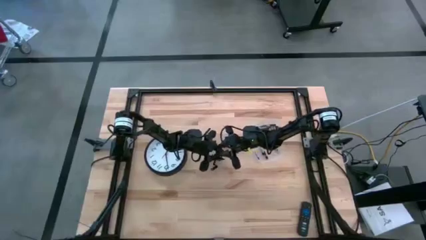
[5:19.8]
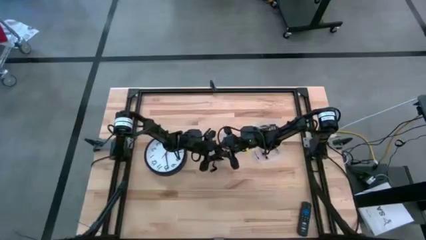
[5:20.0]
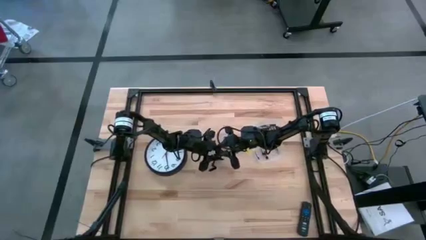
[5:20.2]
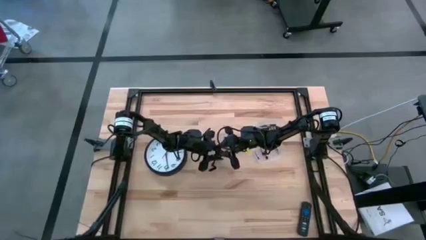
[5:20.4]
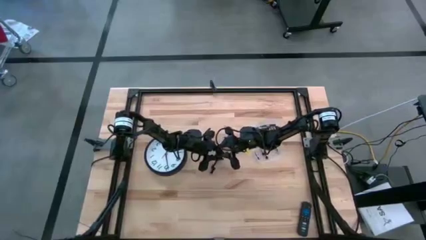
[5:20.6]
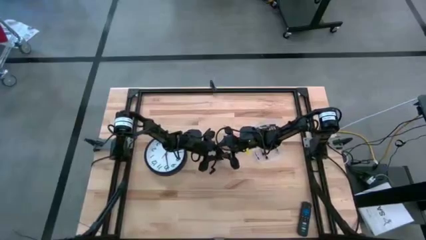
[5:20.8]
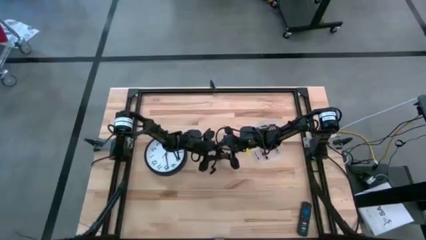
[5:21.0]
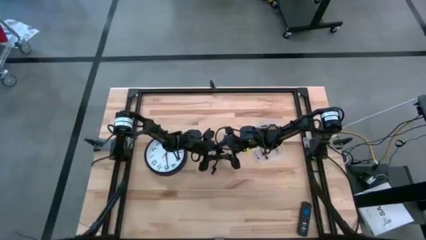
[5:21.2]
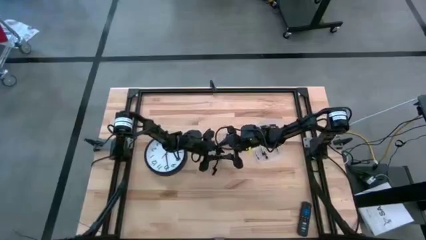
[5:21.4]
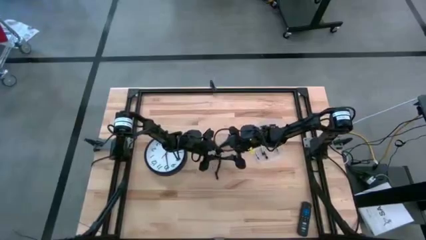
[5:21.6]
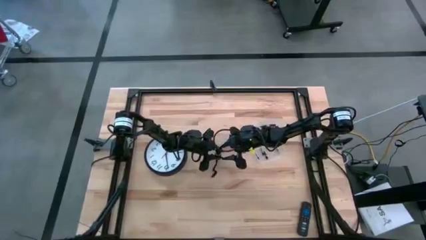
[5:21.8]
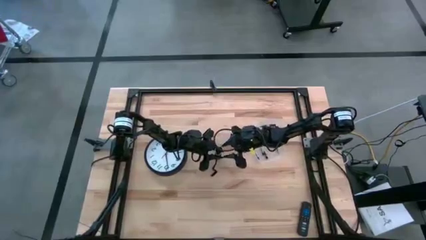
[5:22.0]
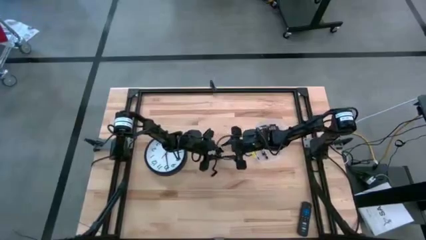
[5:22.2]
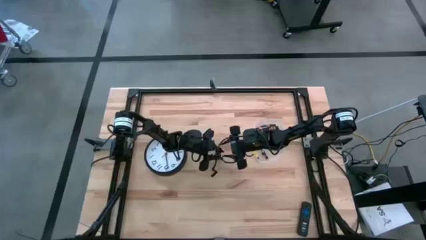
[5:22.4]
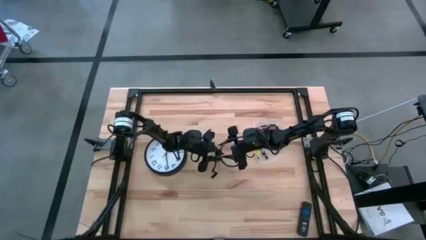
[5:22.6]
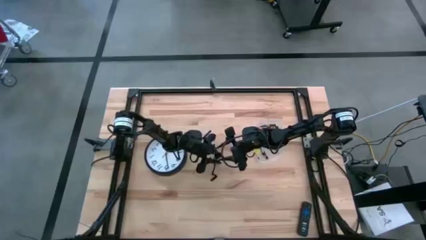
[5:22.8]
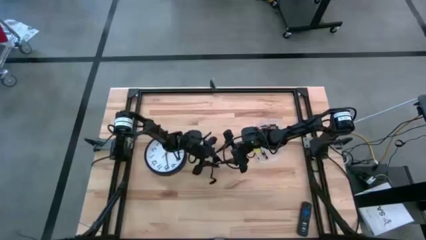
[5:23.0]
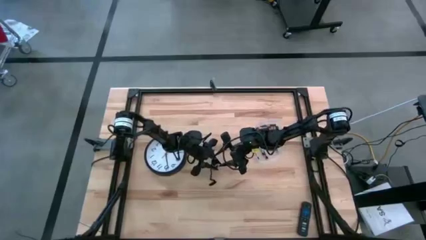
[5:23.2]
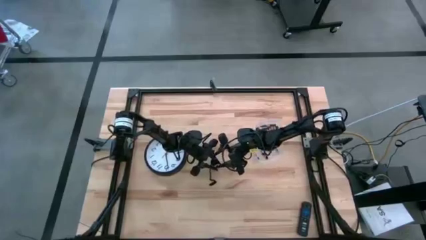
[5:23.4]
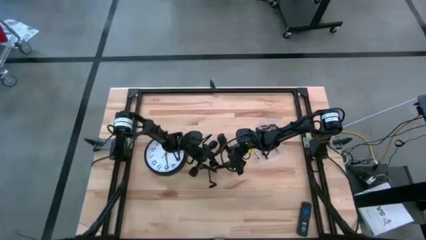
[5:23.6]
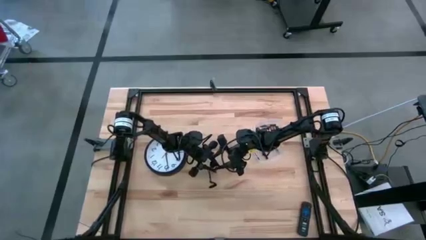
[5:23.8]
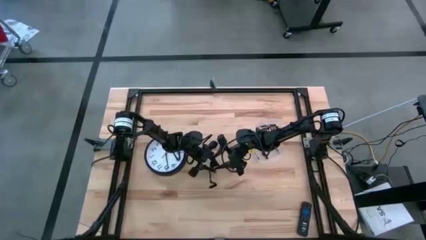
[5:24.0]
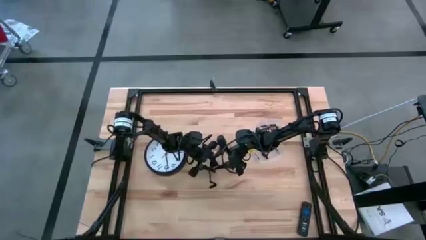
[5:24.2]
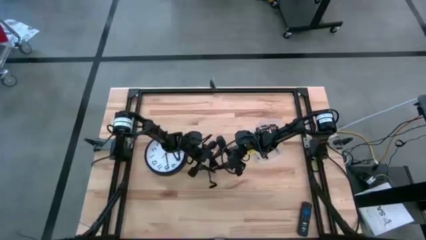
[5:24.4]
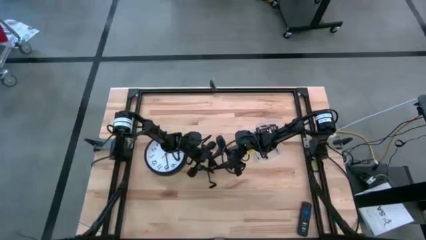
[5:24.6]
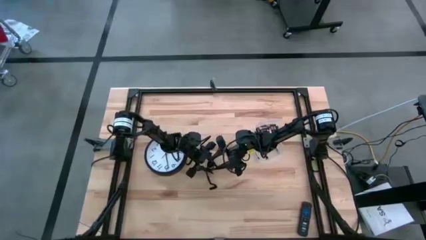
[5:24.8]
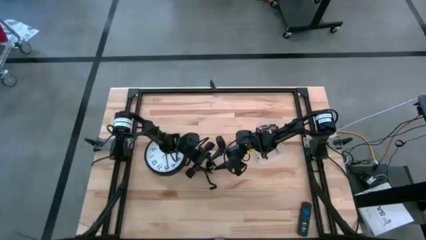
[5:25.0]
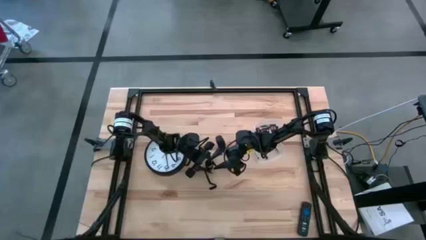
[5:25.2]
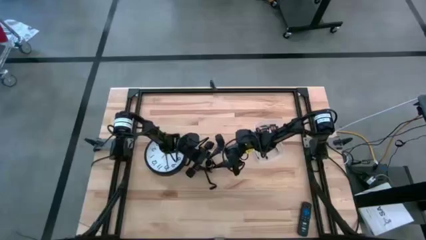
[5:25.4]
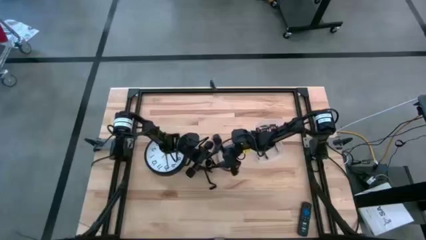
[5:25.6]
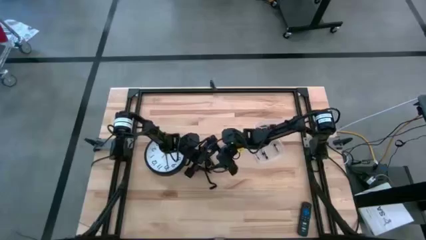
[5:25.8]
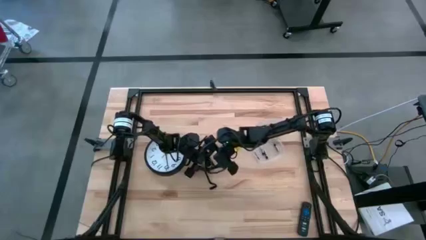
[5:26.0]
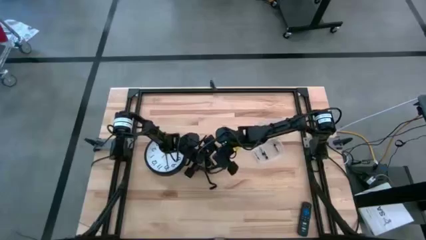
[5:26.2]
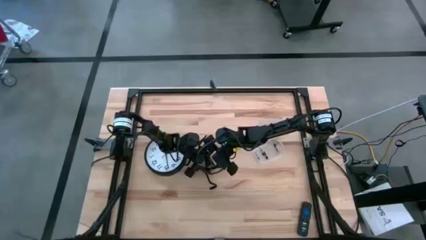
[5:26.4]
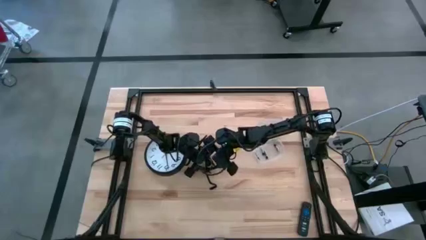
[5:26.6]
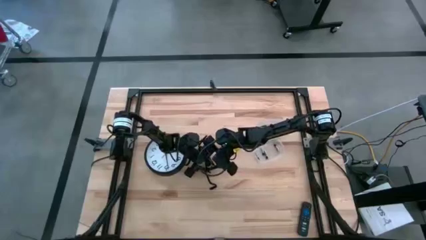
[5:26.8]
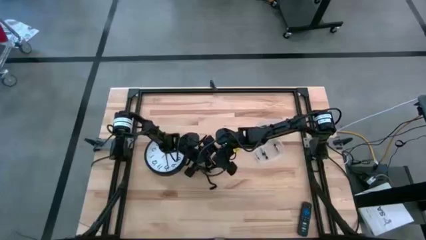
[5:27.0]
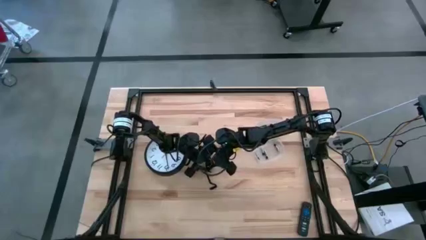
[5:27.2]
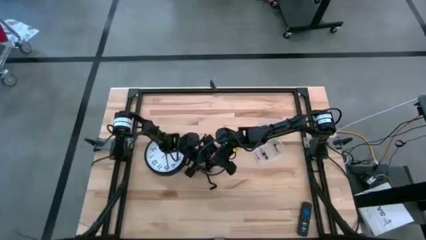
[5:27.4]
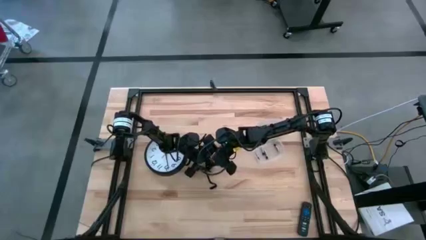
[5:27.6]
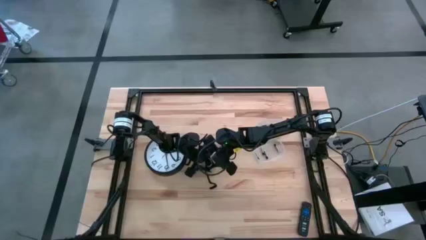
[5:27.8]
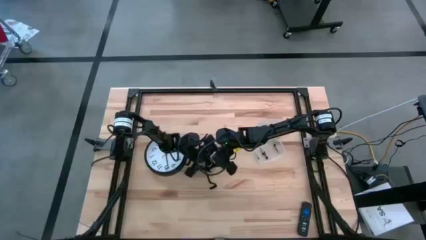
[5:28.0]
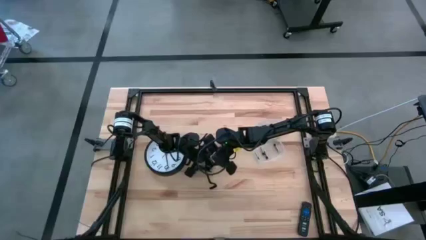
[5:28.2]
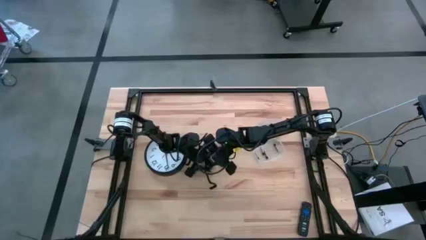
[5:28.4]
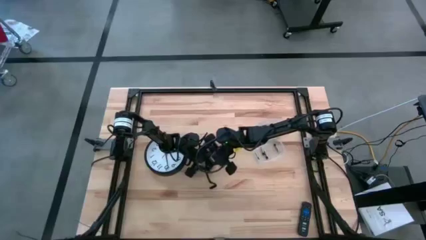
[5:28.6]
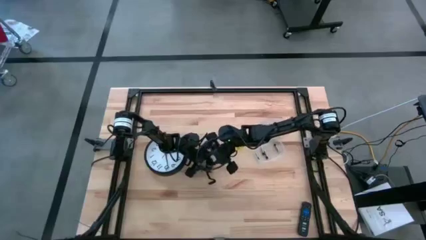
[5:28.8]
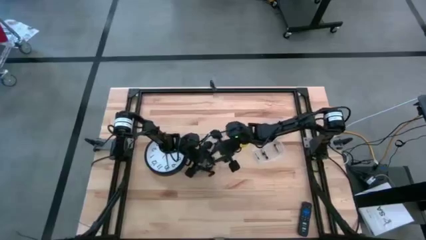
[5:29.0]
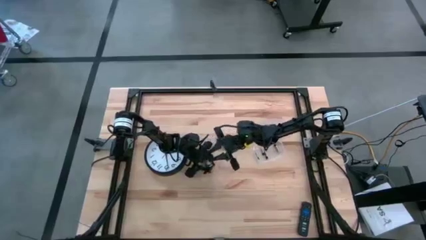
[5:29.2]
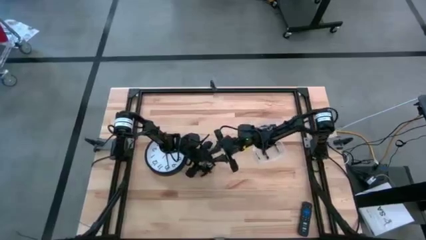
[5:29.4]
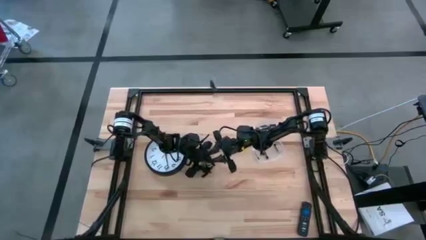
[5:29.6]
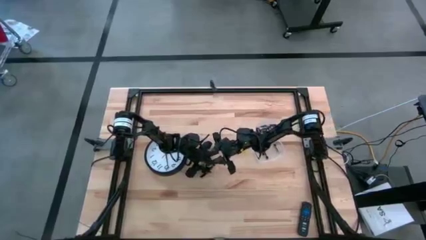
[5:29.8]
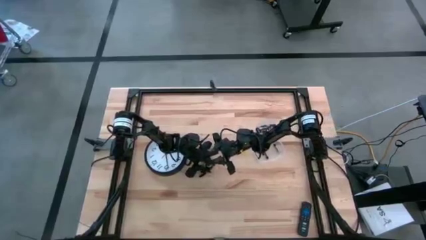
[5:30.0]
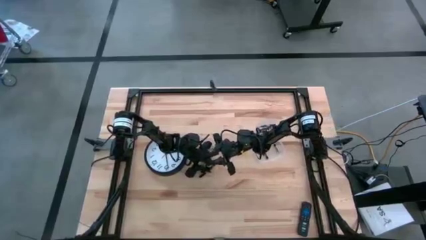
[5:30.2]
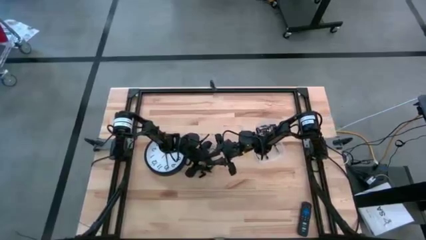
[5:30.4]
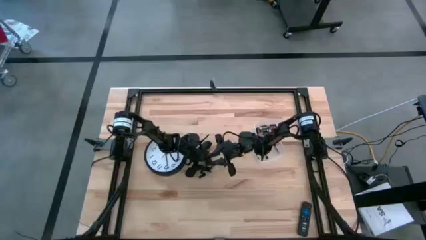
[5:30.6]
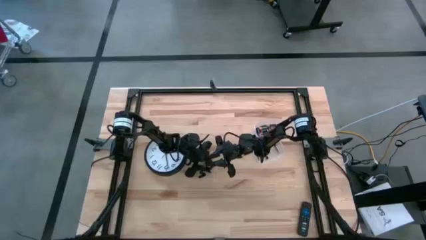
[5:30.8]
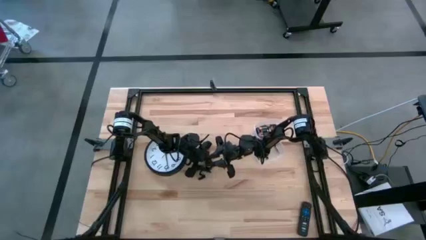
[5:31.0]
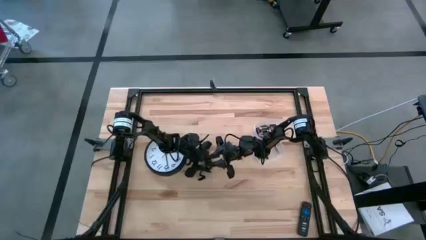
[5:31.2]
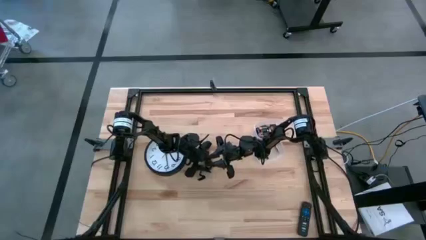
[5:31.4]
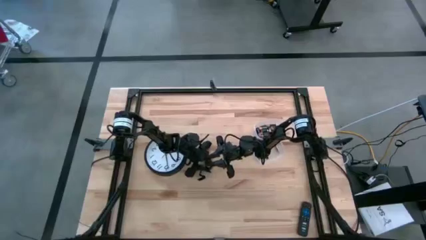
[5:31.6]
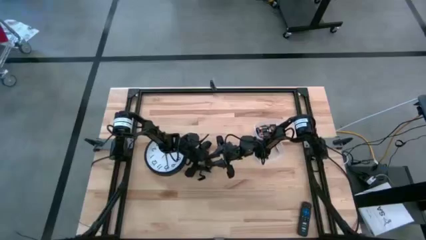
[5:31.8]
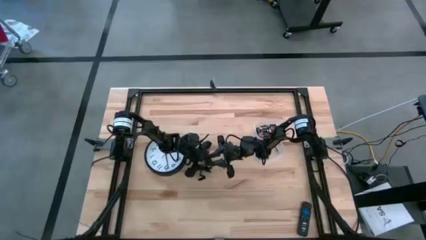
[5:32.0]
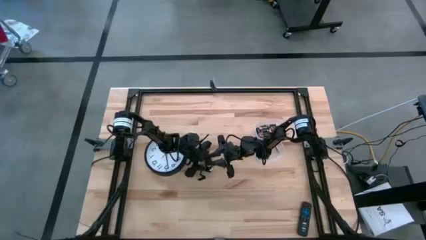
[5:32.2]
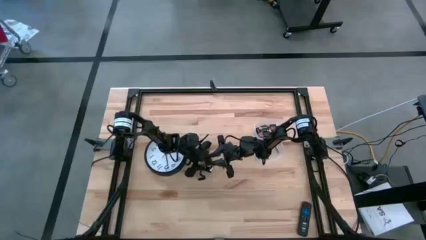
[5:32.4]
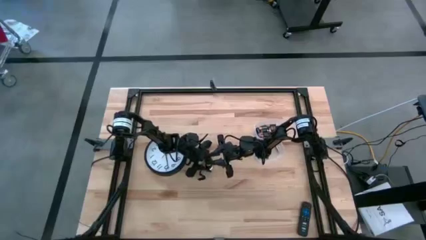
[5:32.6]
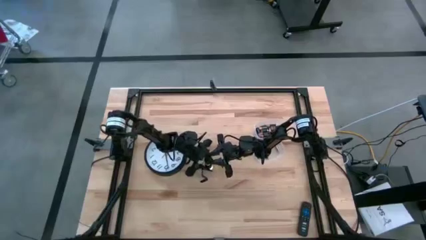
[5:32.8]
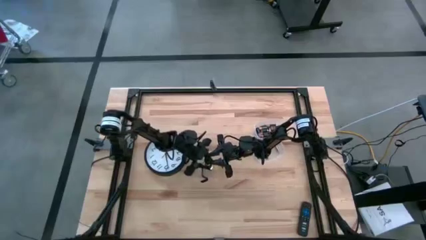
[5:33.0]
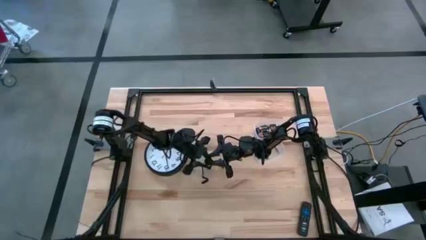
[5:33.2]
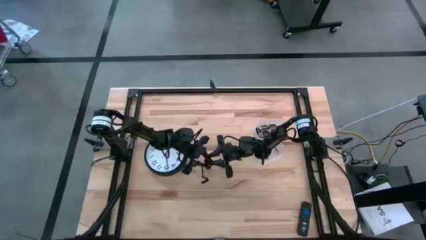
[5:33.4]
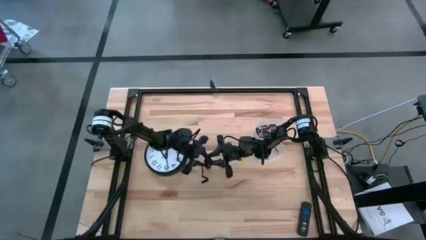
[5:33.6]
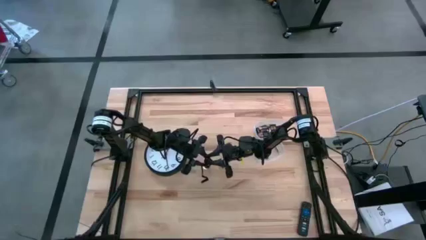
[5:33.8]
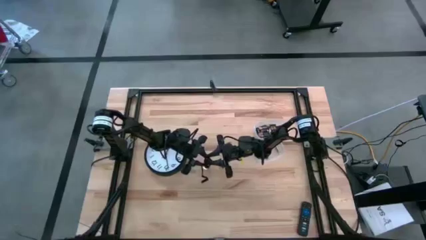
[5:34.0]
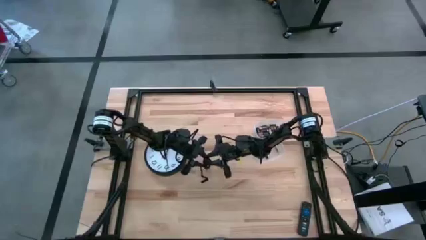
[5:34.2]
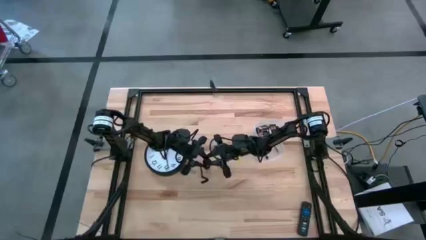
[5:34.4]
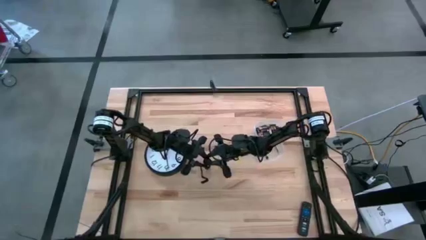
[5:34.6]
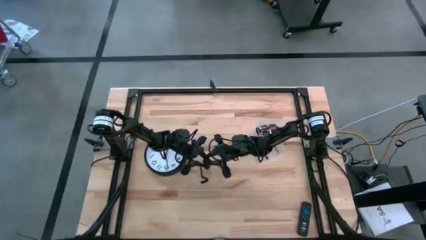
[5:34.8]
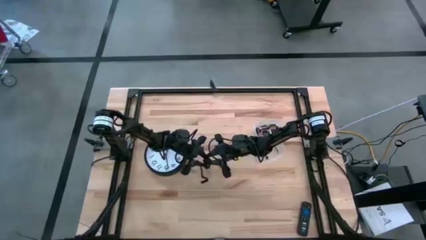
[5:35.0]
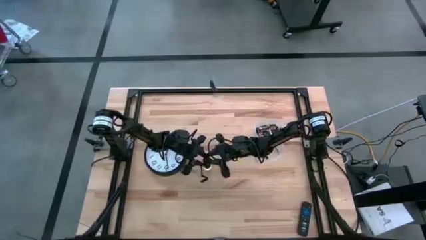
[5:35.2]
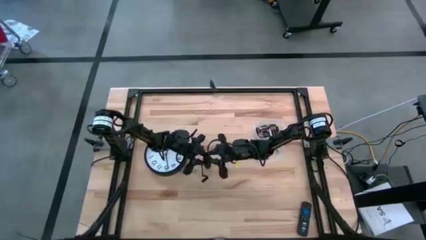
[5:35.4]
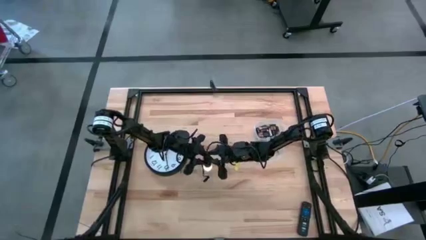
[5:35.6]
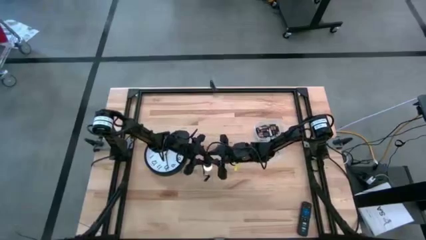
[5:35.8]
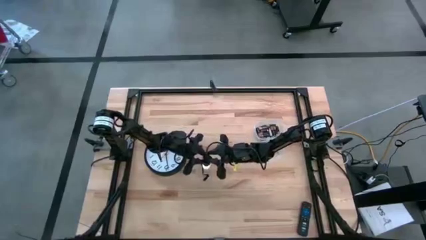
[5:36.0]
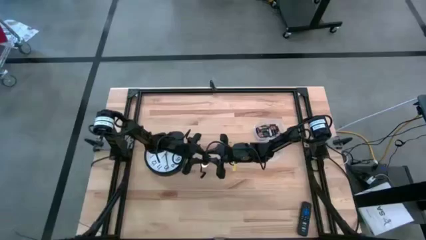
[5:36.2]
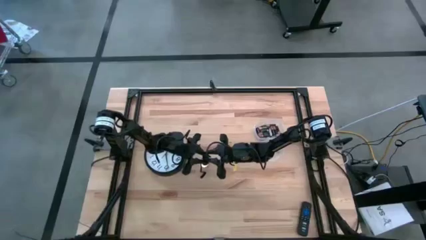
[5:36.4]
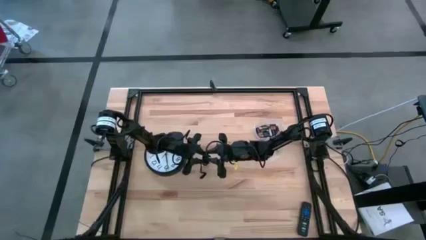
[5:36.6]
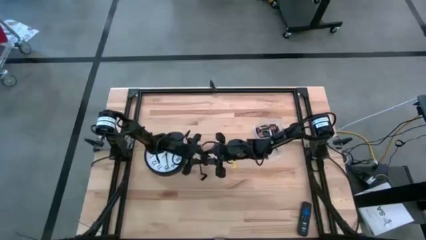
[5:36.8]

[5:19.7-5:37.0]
Task: Insert battery
Close the black battery compartment
